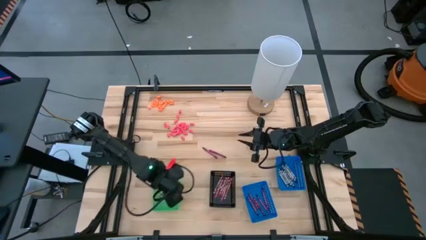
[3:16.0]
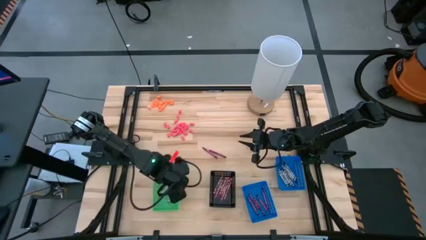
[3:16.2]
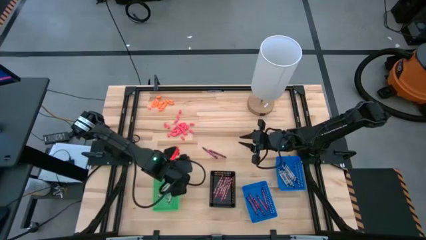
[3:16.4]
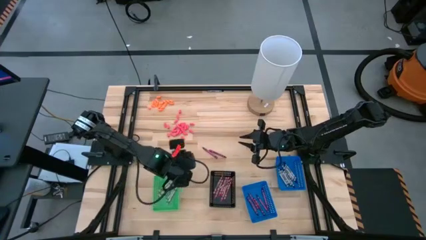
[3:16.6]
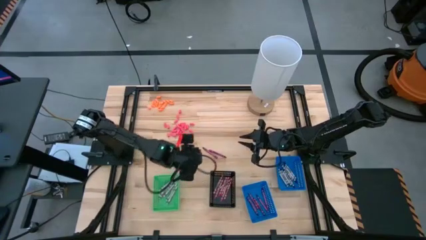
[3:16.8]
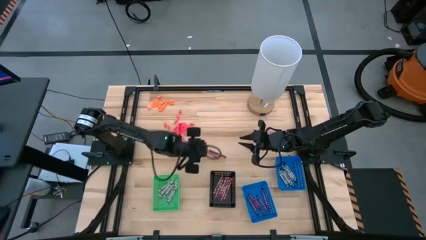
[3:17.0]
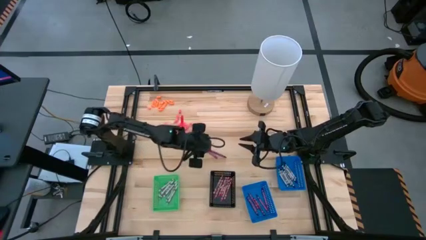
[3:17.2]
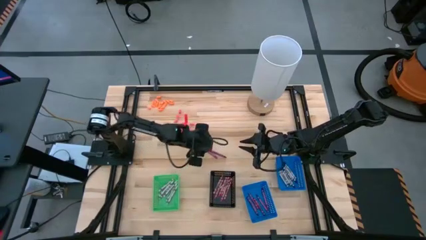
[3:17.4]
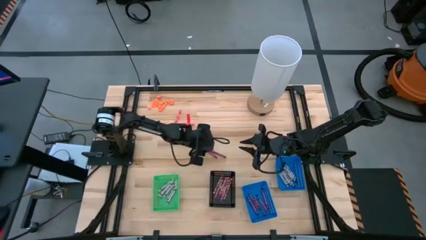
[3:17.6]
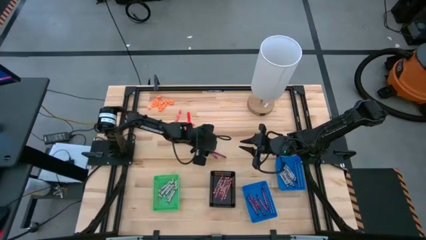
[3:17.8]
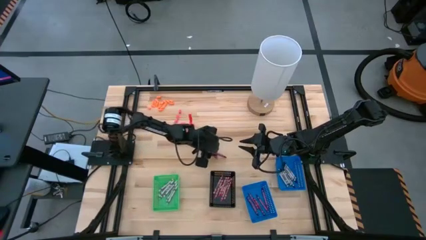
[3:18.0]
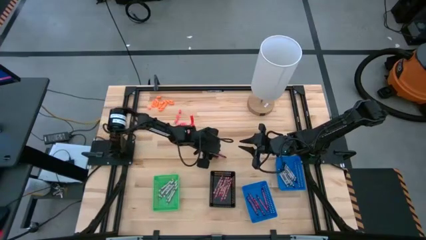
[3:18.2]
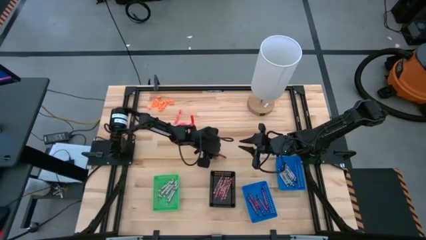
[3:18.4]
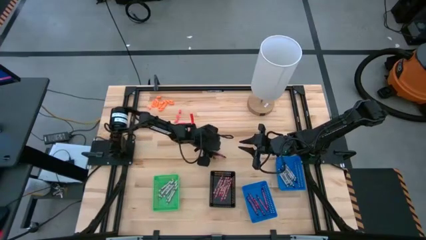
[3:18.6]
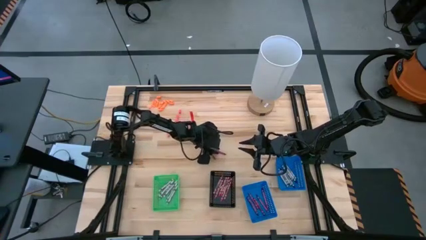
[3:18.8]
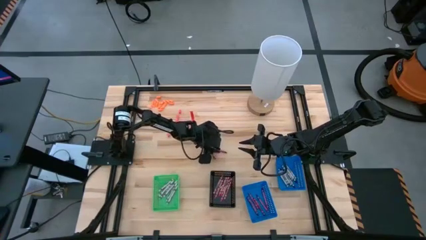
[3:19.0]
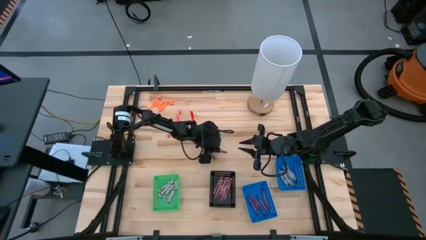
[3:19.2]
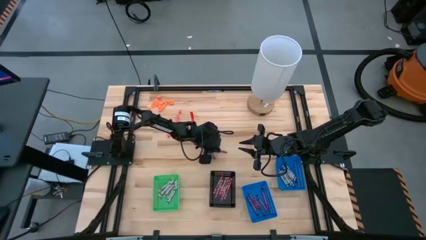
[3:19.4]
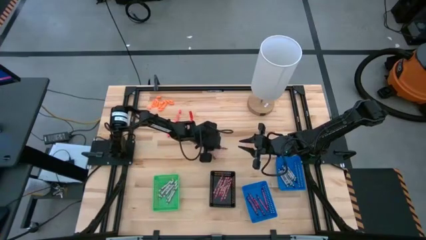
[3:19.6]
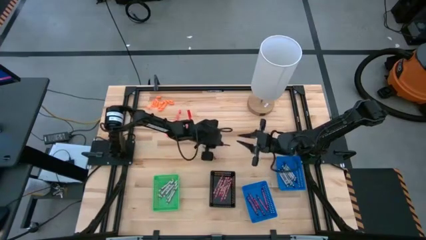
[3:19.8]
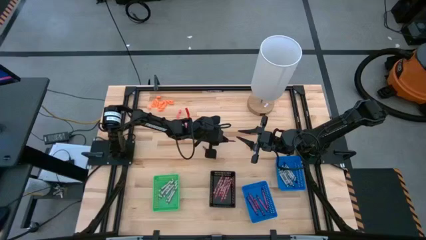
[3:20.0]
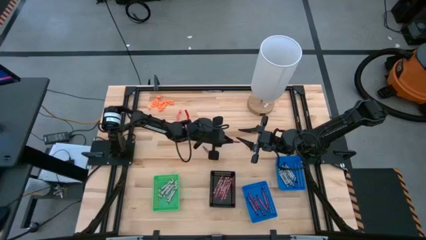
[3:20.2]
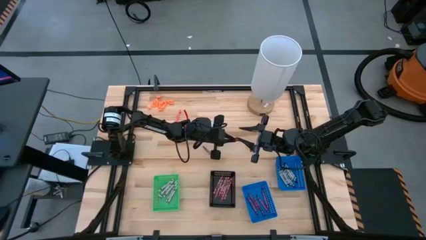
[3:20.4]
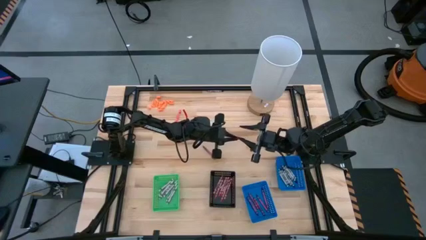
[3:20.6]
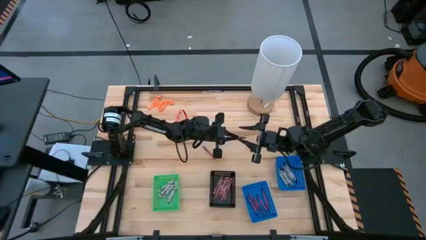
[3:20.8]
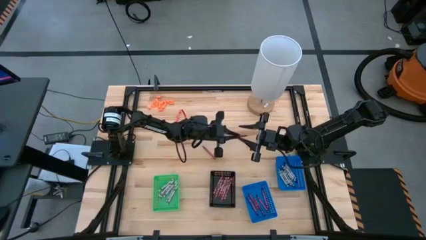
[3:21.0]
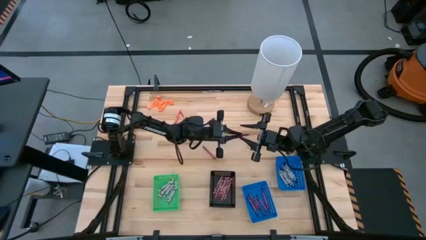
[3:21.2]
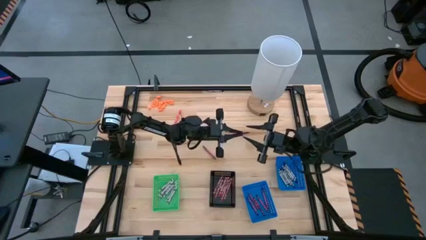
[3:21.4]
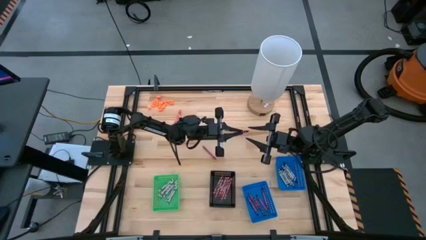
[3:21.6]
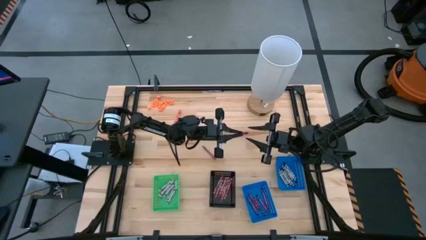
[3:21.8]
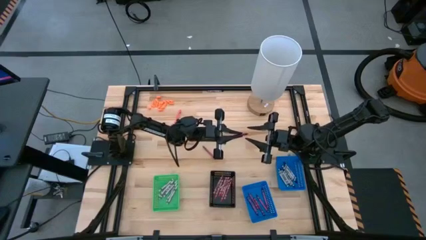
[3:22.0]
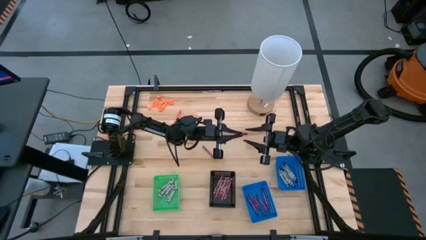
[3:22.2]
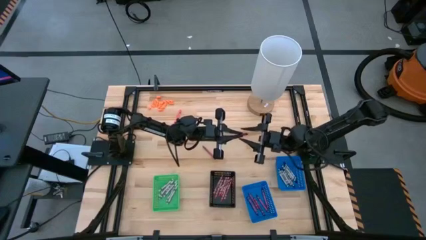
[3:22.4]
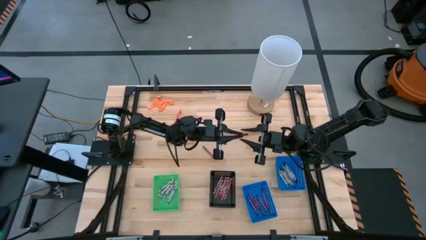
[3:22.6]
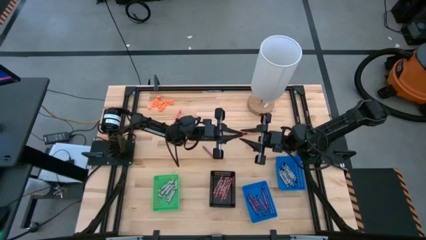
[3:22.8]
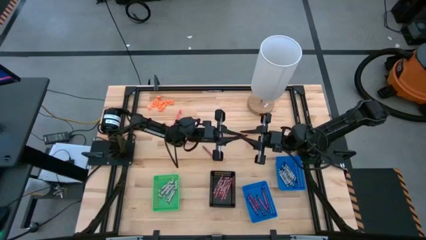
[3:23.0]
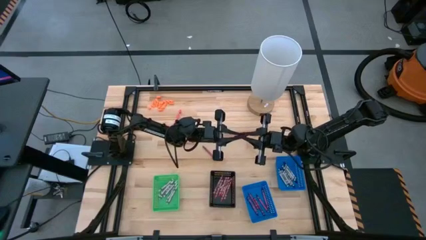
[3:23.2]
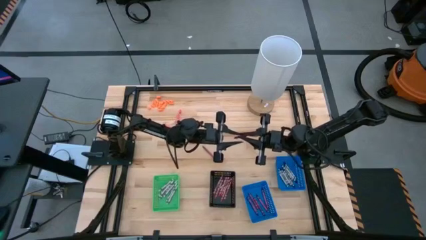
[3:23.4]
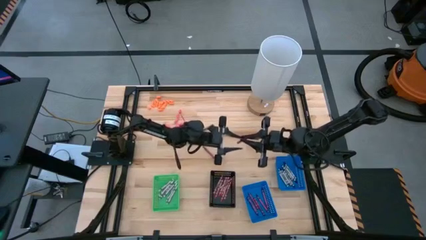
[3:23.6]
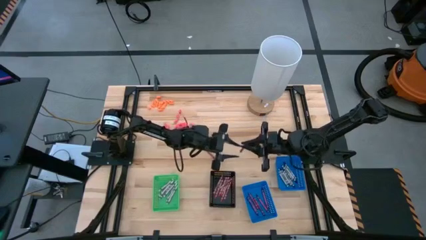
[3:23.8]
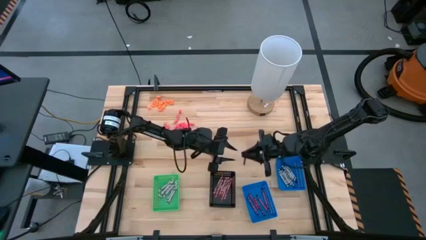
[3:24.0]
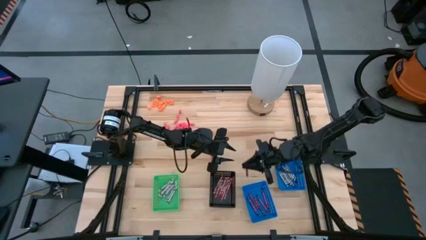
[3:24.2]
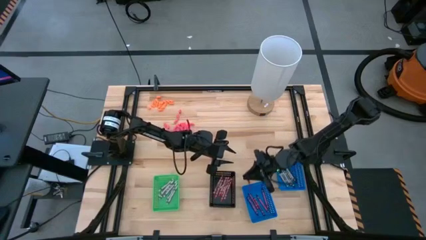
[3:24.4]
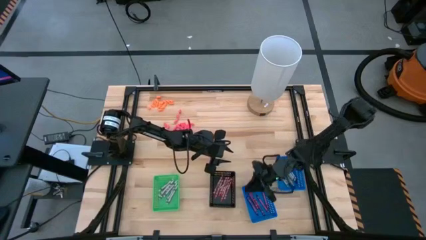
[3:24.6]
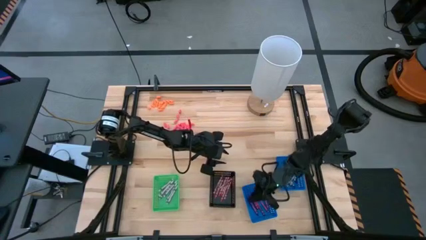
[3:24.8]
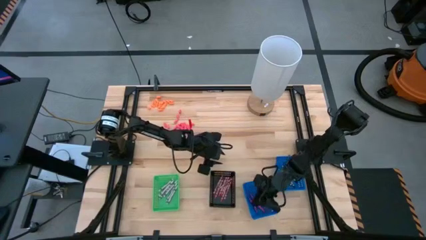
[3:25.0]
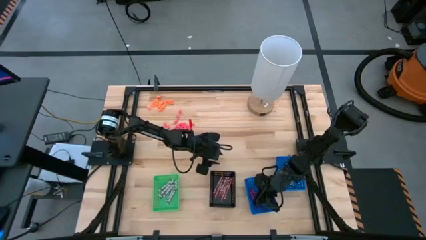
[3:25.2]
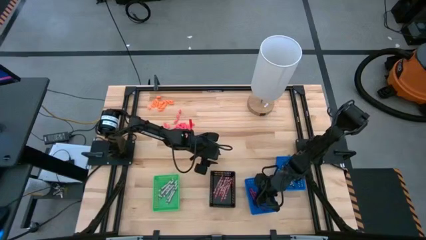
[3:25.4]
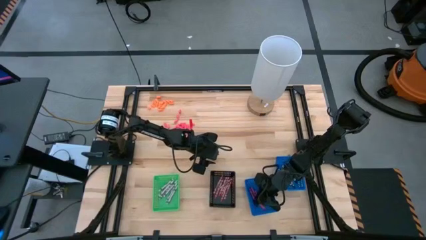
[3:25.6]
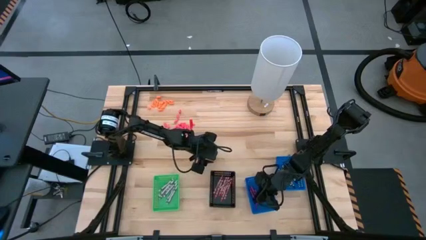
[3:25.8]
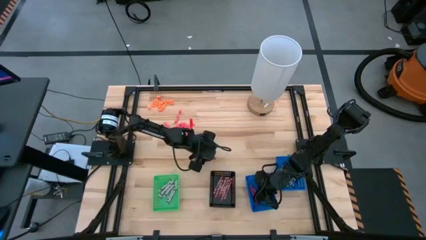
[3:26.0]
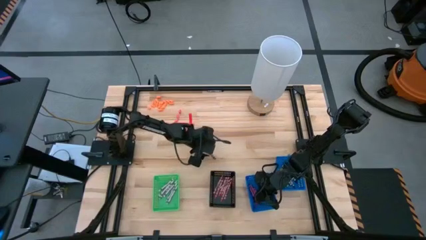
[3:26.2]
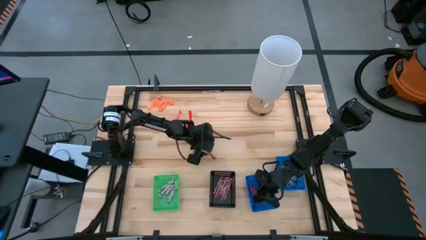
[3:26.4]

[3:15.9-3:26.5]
Task: Sort crayons
Put the red crayon into the left blue bin

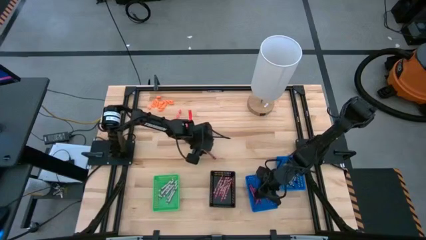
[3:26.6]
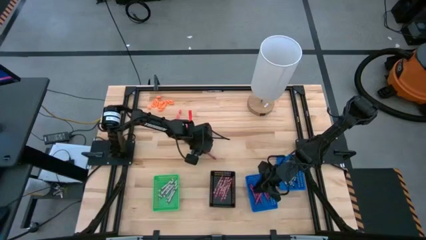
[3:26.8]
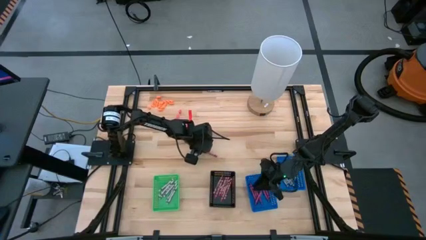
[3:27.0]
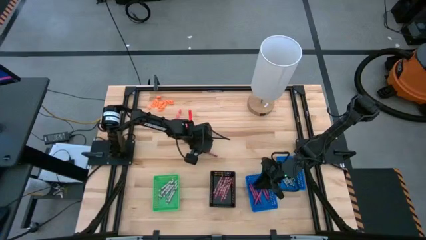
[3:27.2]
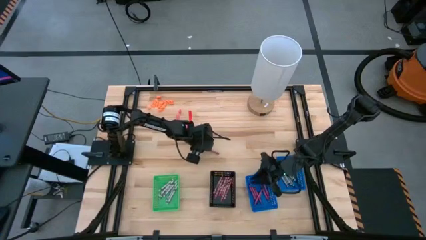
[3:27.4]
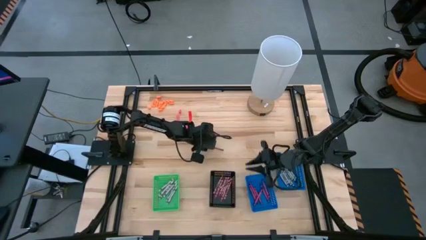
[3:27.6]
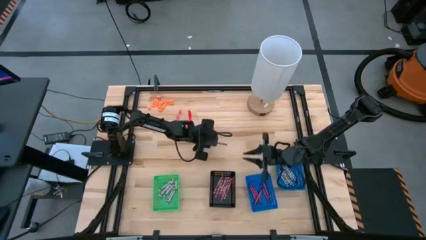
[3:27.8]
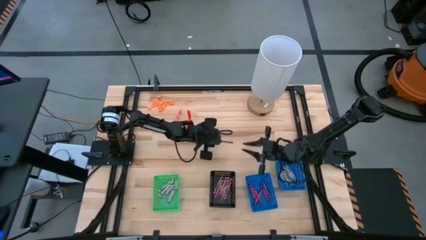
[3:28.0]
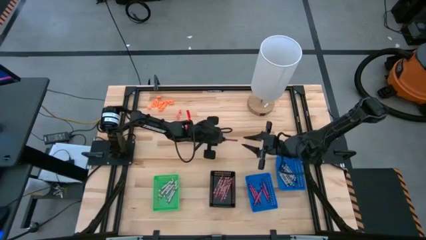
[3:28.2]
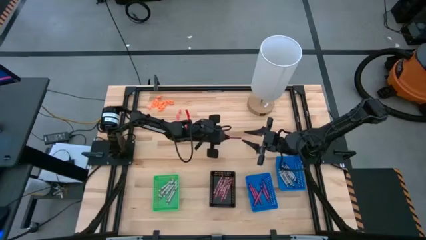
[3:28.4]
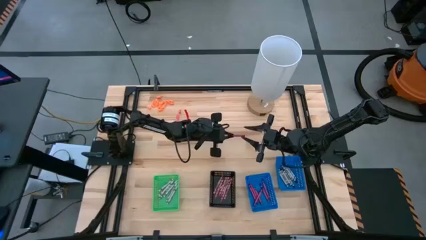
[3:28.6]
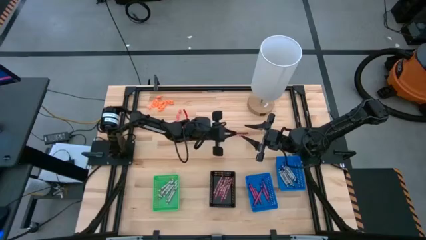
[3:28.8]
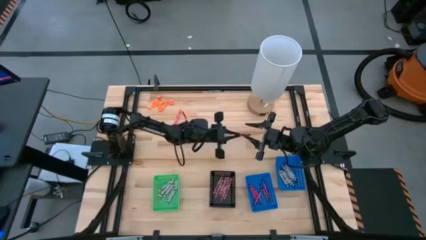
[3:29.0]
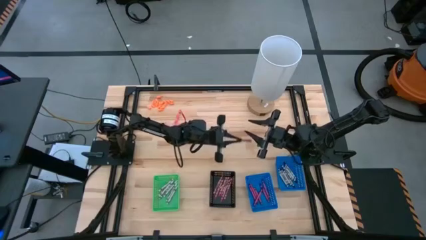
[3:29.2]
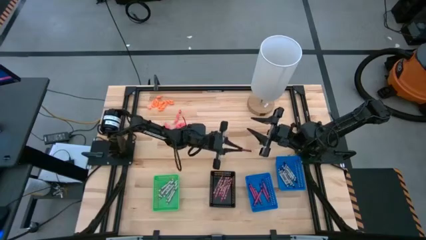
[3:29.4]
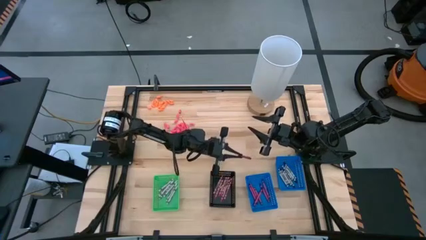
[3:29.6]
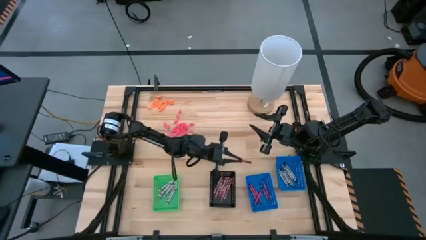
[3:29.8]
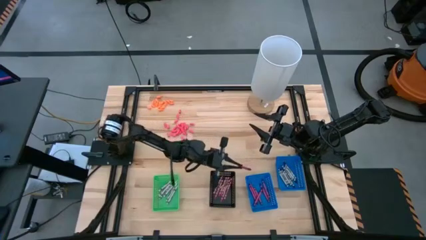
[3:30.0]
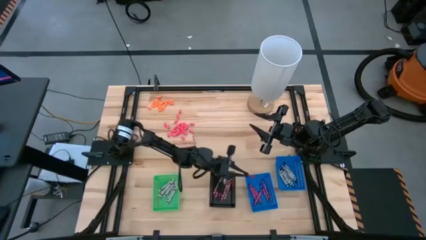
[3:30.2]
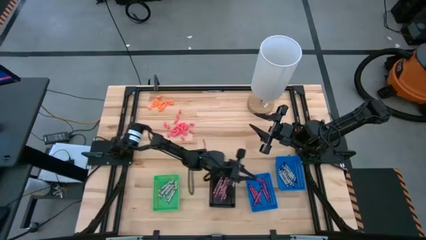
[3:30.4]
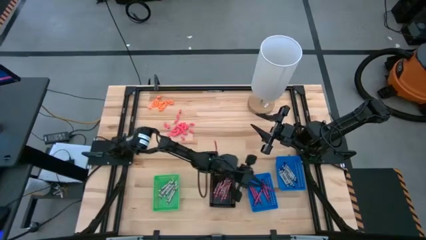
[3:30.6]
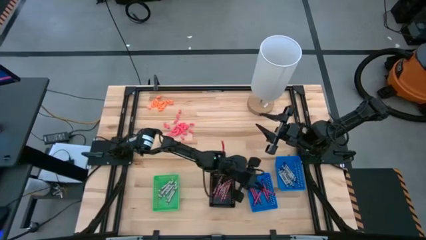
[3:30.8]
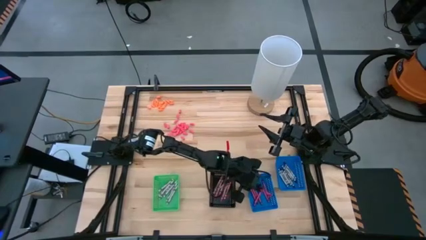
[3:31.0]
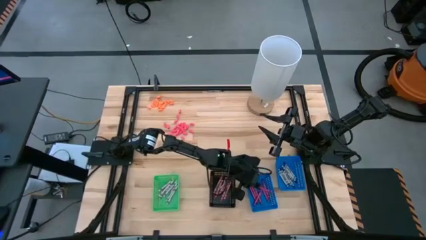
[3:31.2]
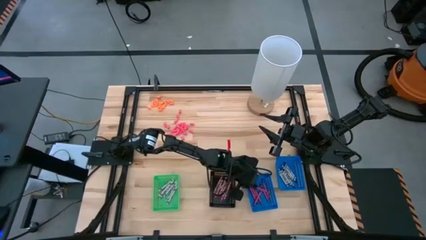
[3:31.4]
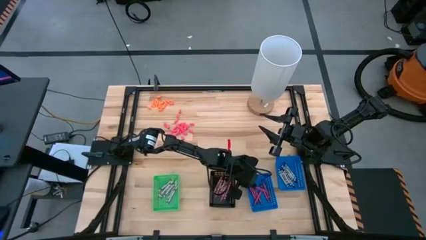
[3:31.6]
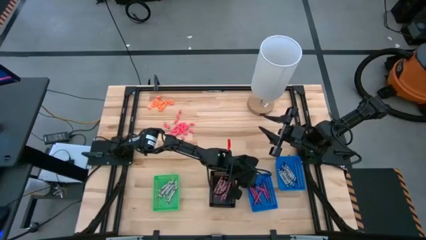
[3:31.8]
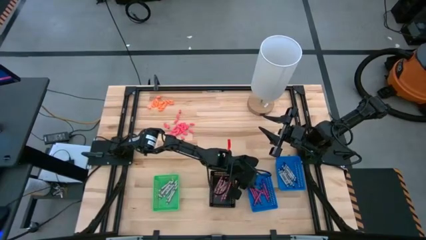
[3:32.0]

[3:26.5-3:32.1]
Put the red crayon into the left blue bin
